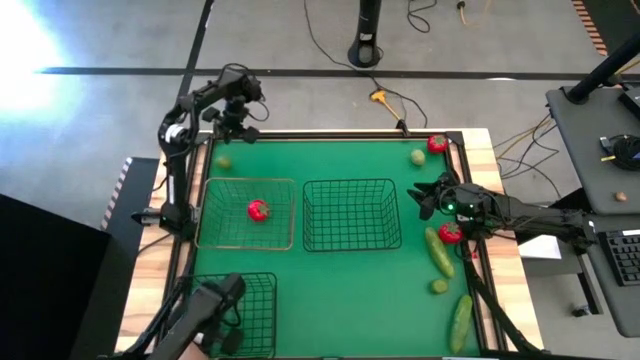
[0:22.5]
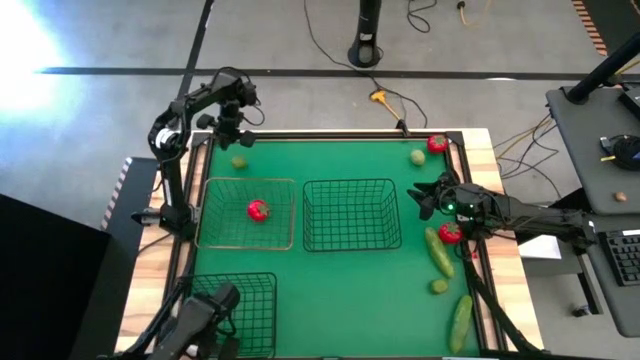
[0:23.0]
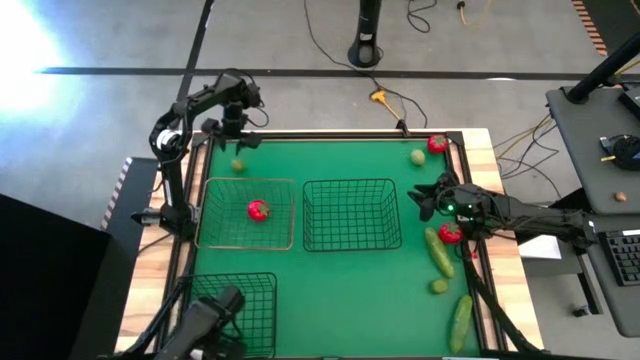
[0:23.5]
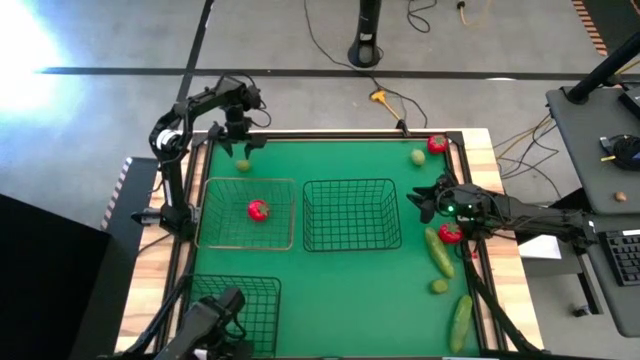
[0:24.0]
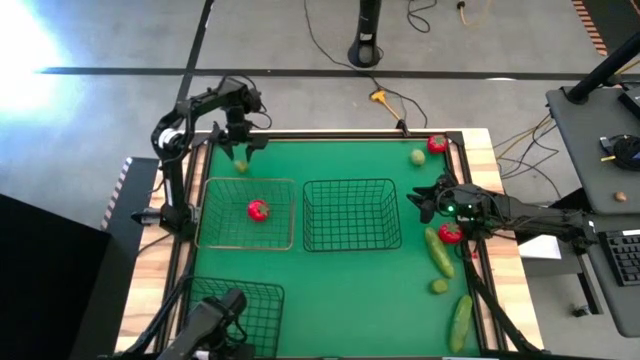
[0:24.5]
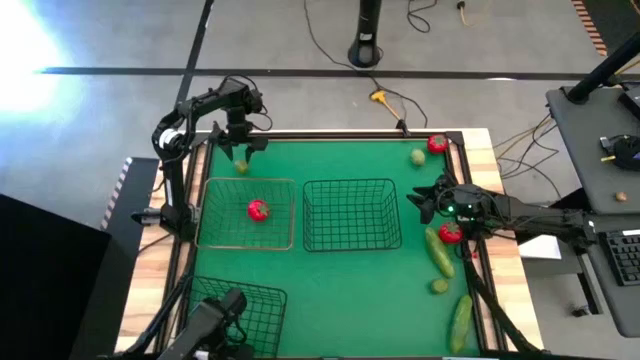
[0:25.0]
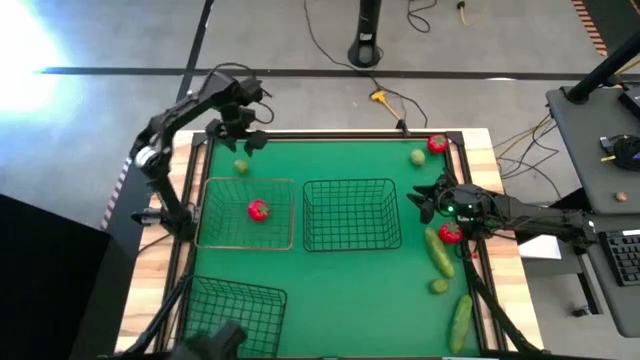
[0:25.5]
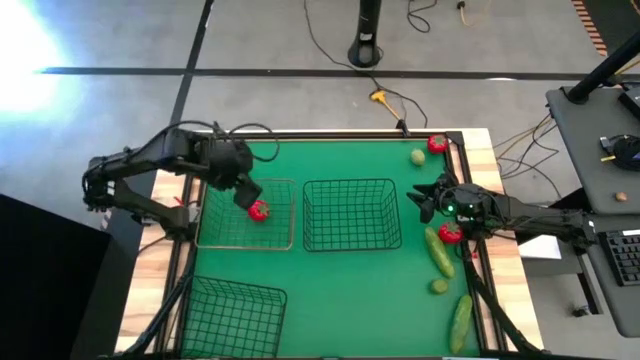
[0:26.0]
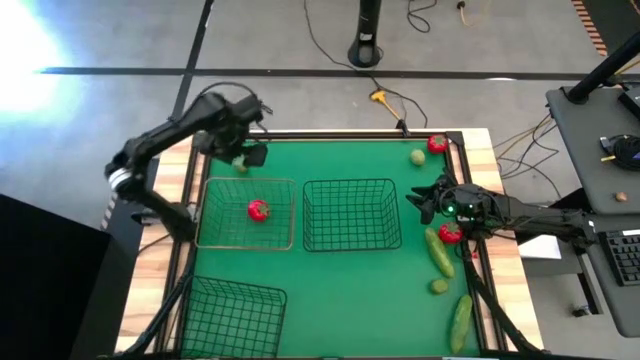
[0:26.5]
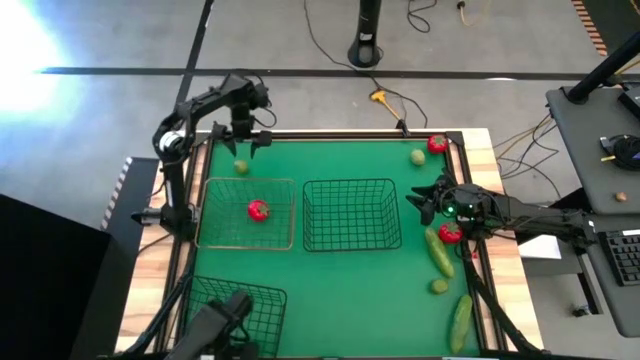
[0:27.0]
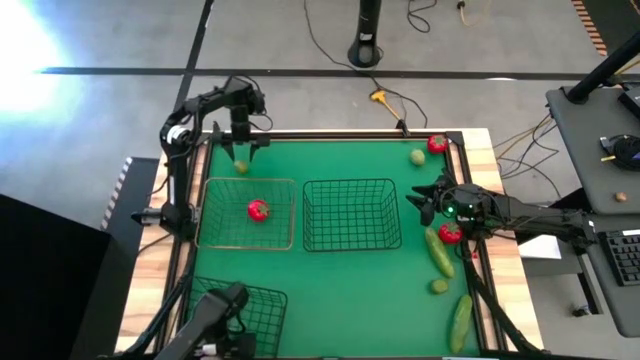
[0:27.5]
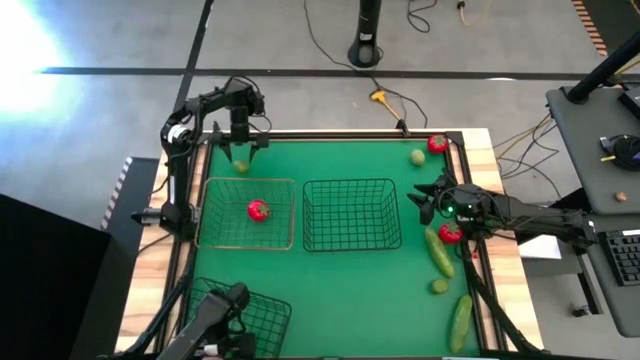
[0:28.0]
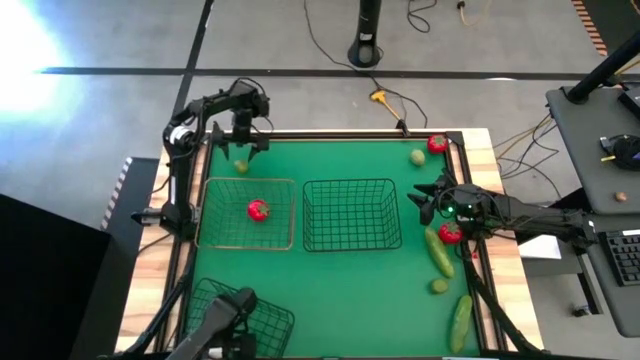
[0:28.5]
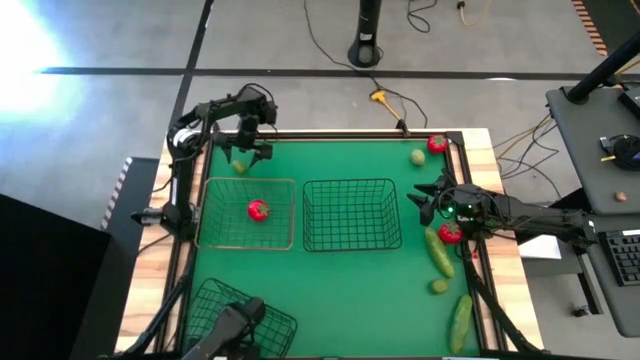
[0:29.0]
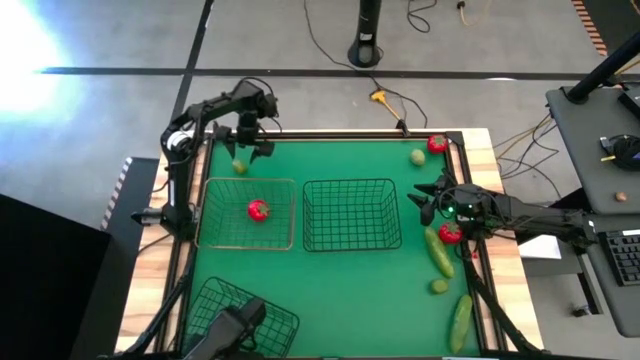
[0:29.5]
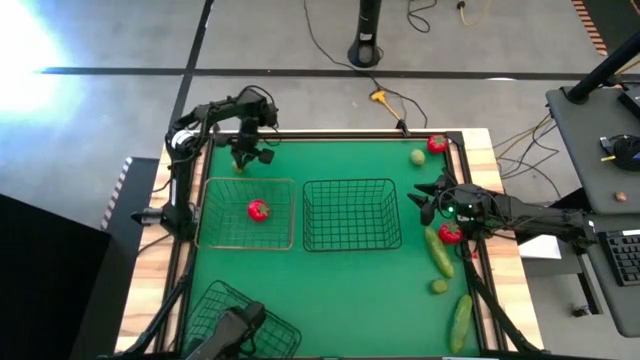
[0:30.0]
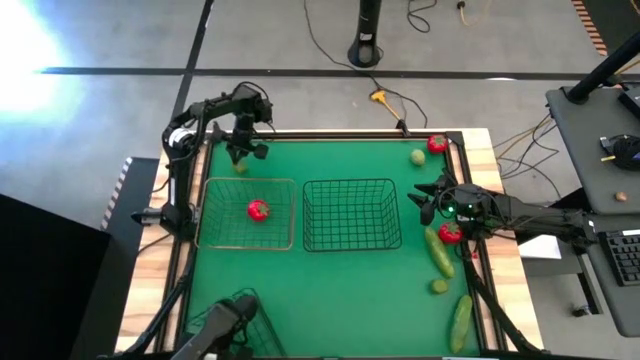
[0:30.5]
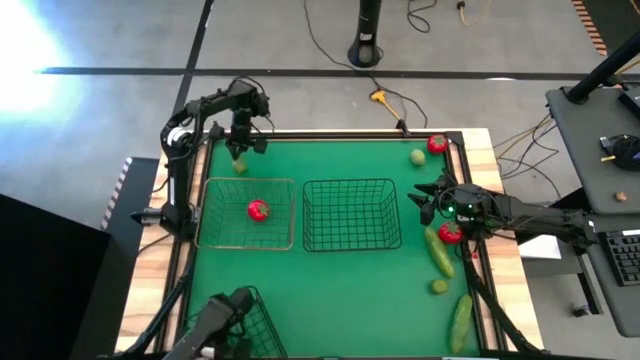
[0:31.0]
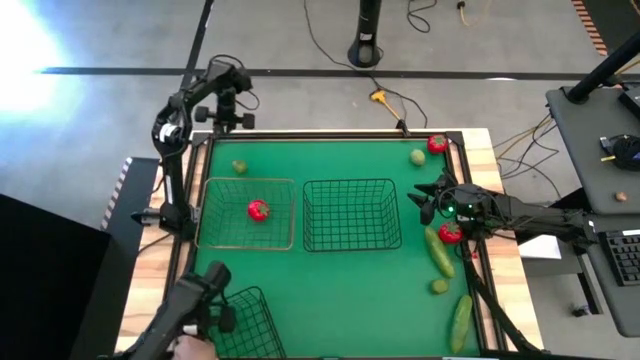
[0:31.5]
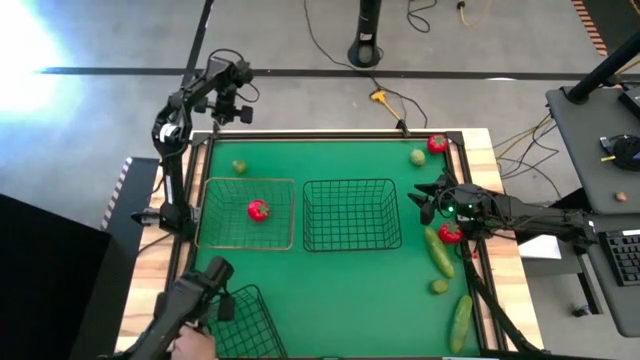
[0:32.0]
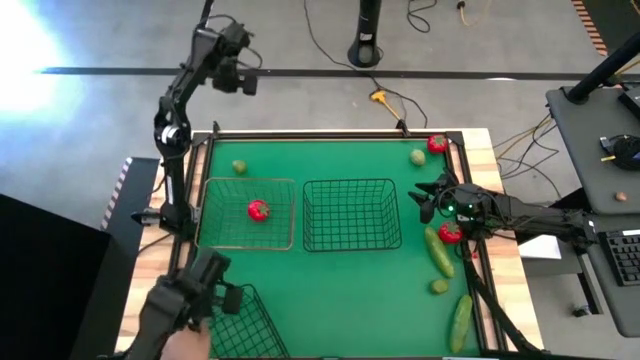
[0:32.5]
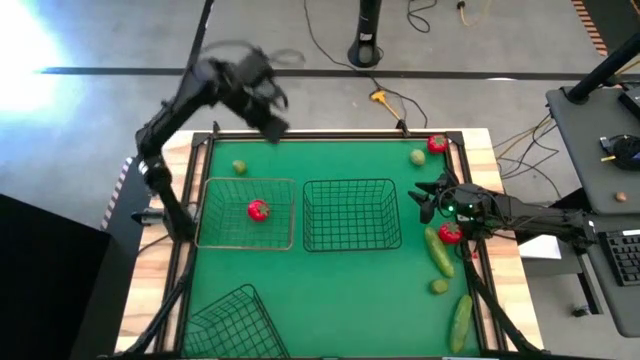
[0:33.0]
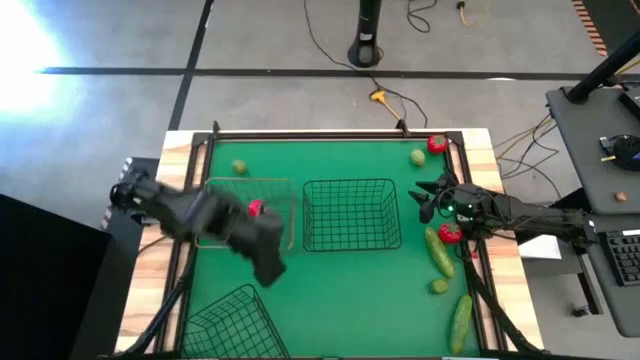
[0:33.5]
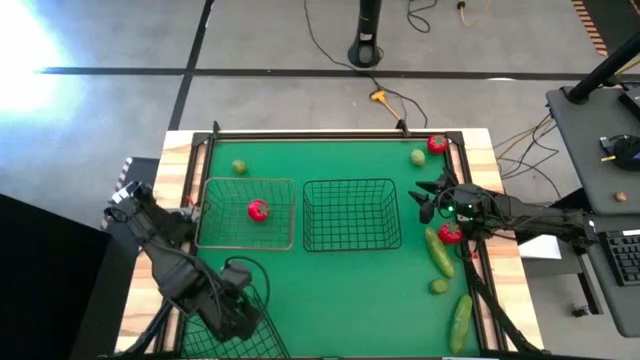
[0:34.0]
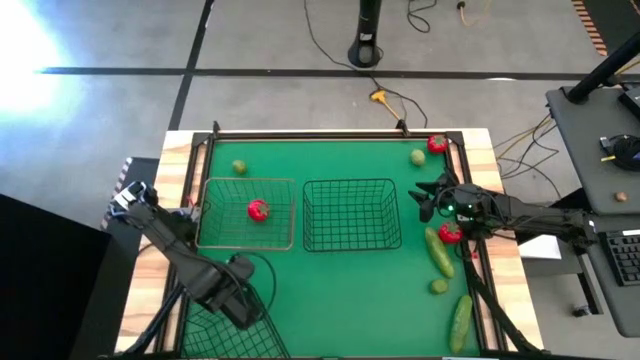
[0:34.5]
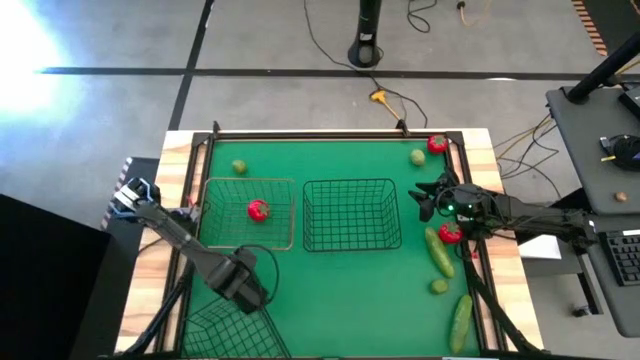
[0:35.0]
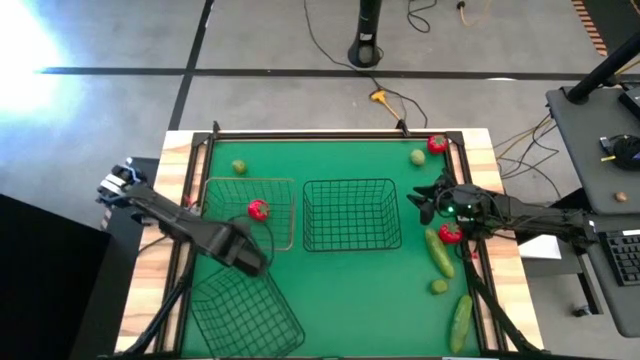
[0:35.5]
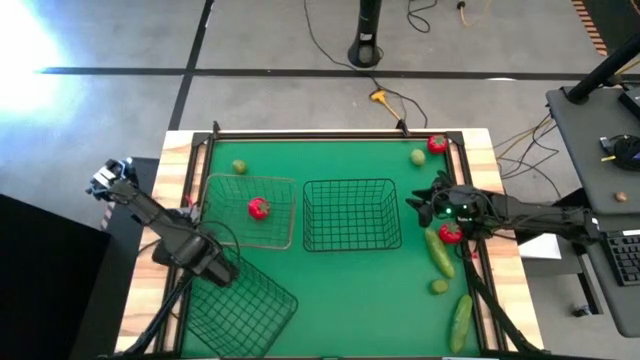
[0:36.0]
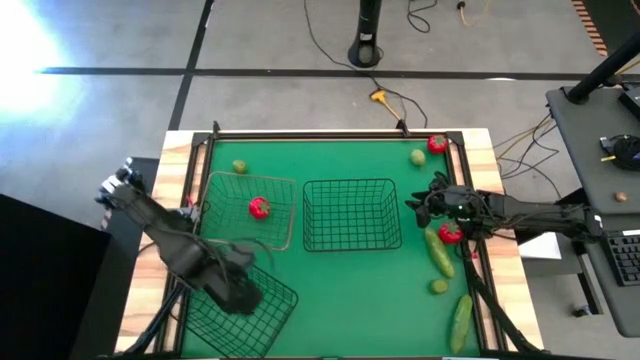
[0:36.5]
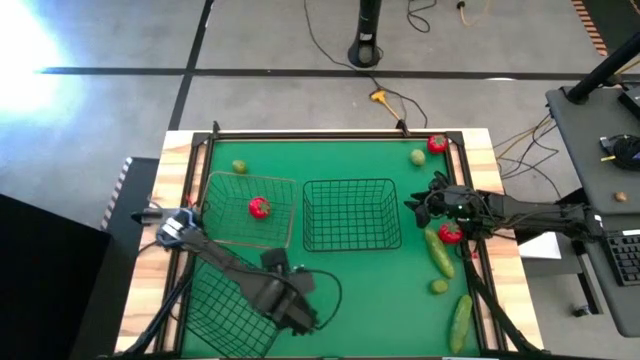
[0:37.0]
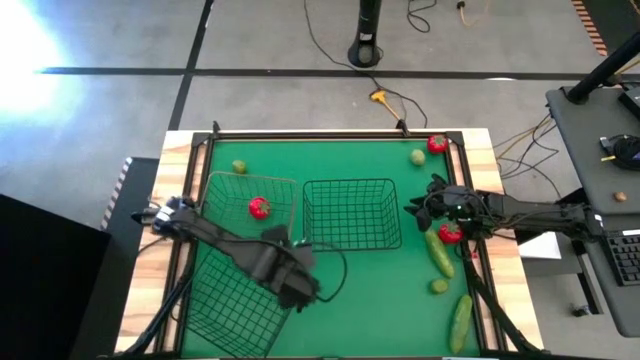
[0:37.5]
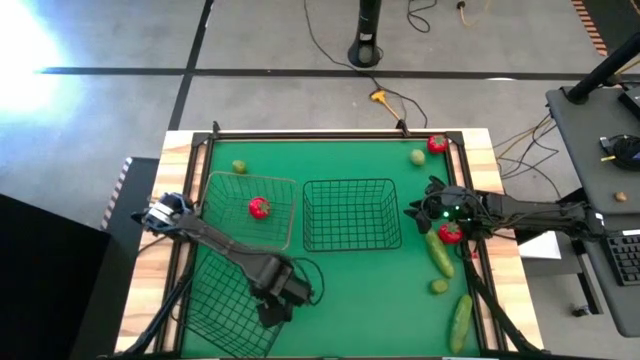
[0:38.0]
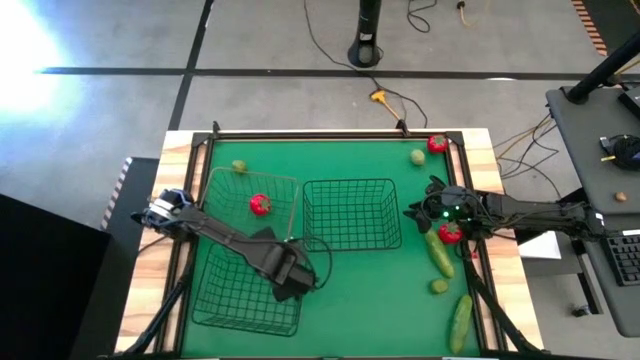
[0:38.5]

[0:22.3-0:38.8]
Task: Sort produce into baskets
Adjust the bottom black wire basket

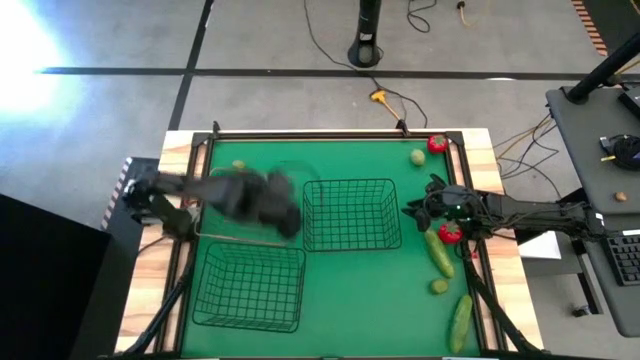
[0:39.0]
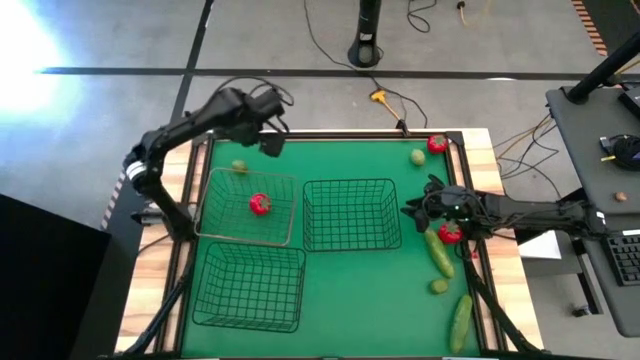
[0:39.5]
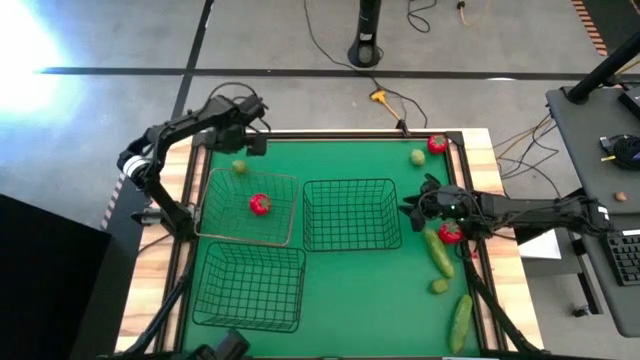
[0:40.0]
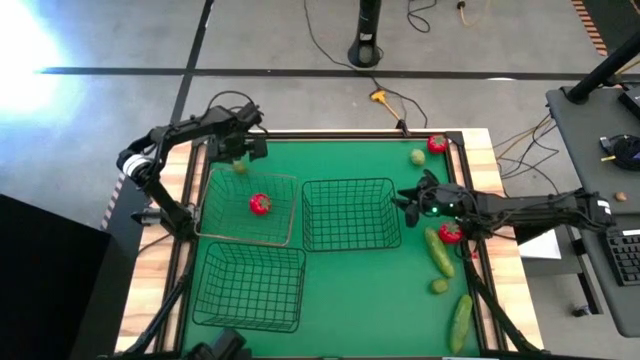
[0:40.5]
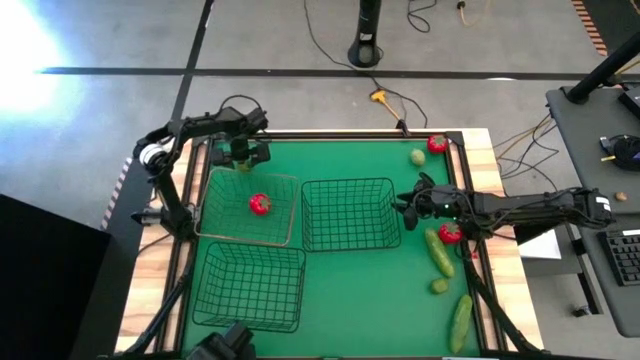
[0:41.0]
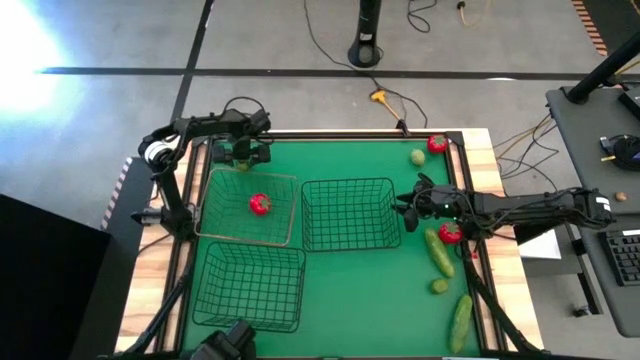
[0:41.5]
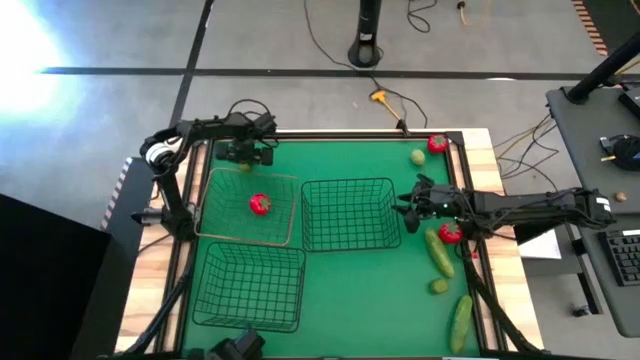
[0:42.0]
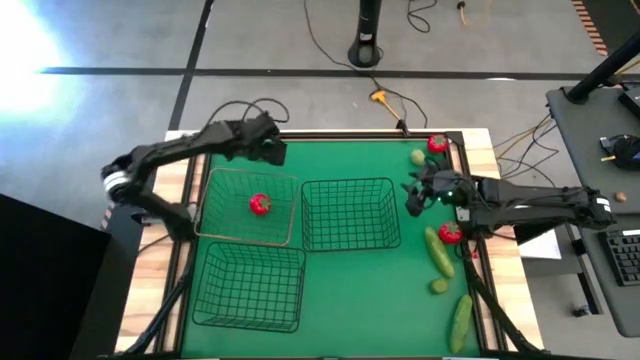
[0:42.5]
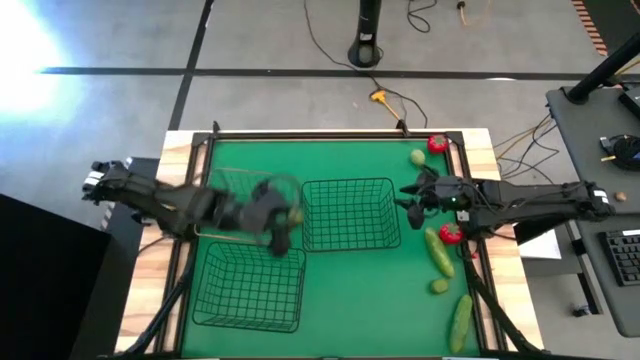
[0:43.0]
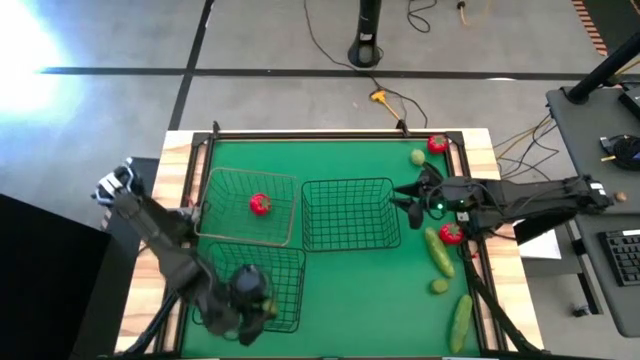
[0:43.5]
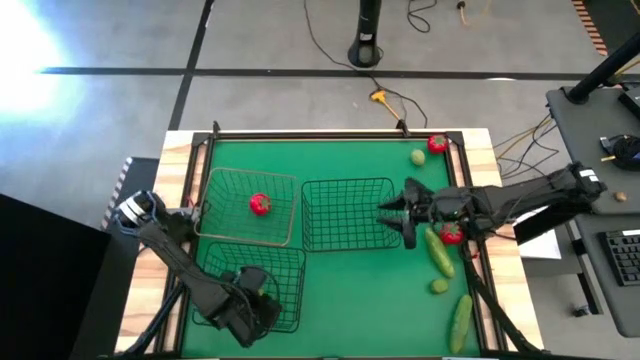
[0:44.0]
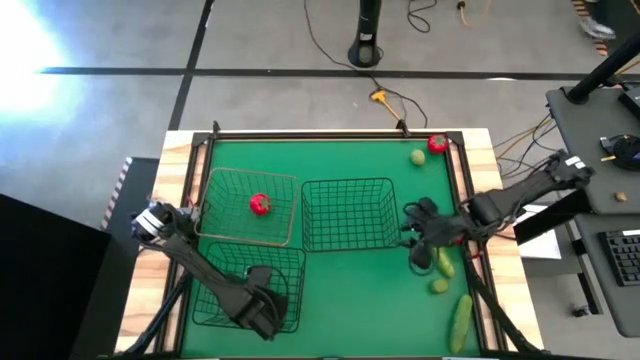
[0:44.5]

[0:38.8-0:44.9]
Put the top left lime into the bottom black wire basket

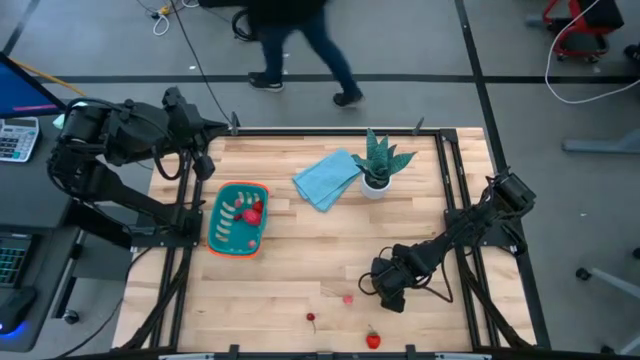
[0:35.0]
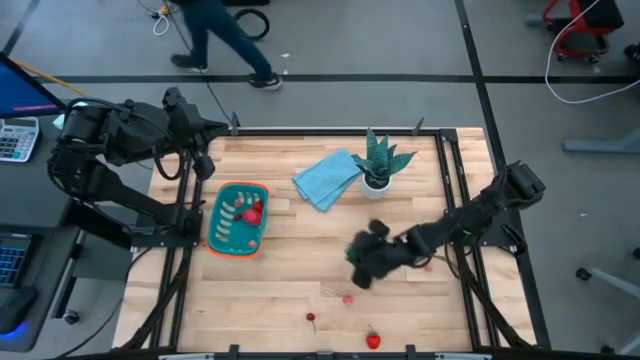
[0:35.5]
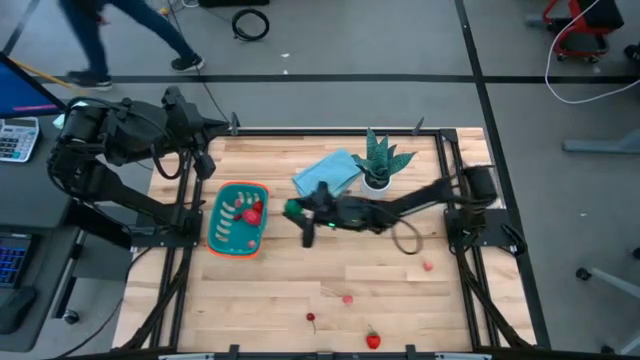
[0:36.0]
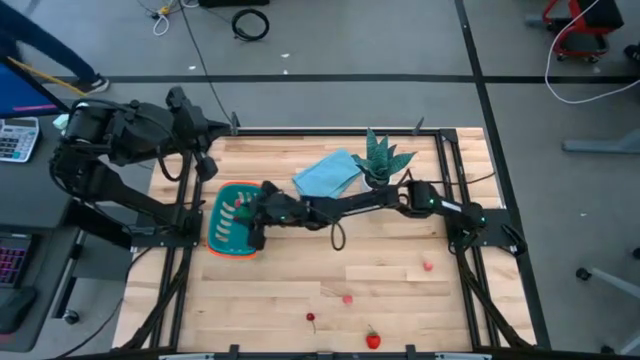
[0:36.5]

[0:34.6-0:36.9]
Task: Pick and placing Produce into tupperware
Put the bell pepper into the blue basket
